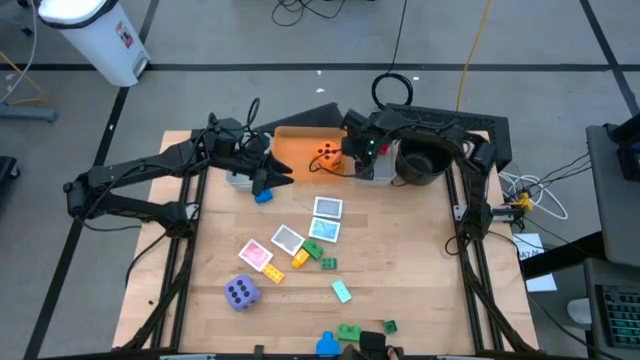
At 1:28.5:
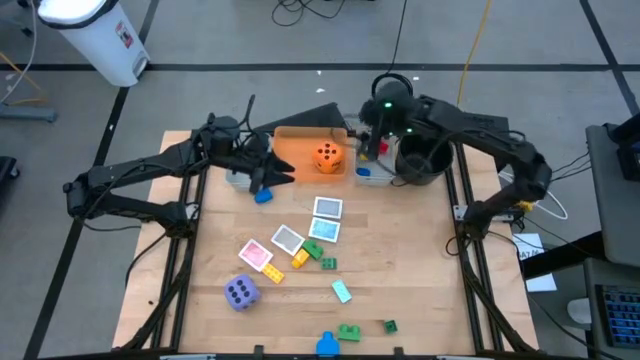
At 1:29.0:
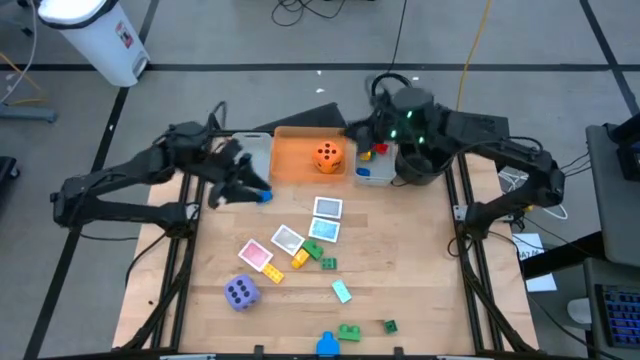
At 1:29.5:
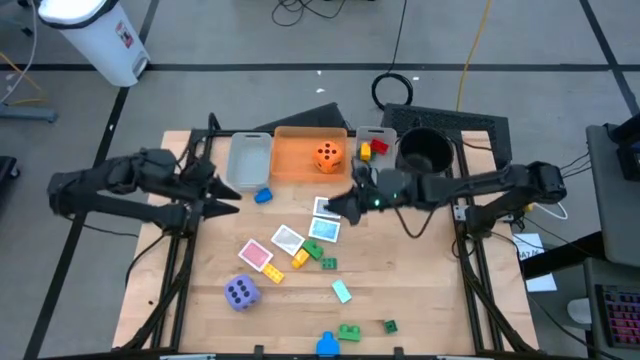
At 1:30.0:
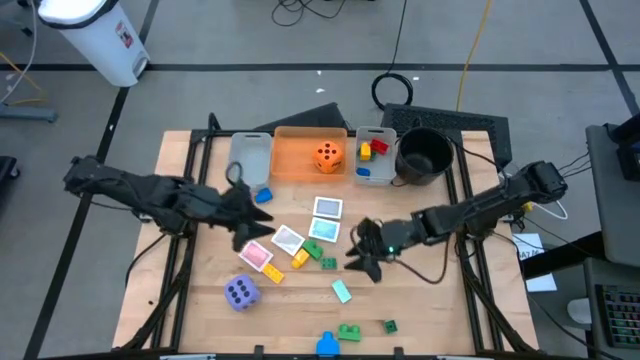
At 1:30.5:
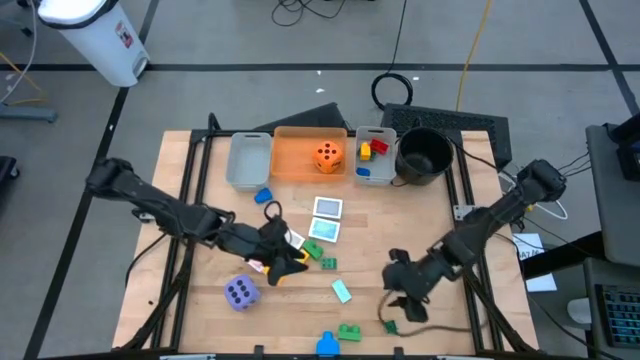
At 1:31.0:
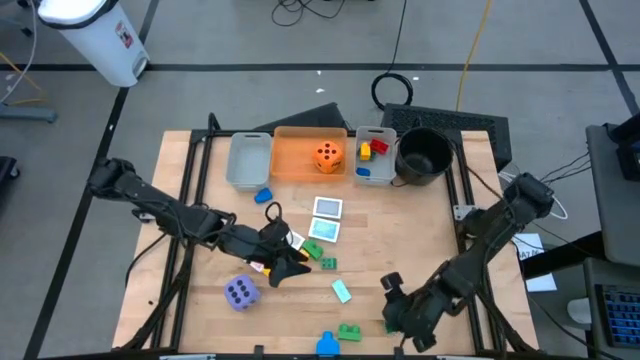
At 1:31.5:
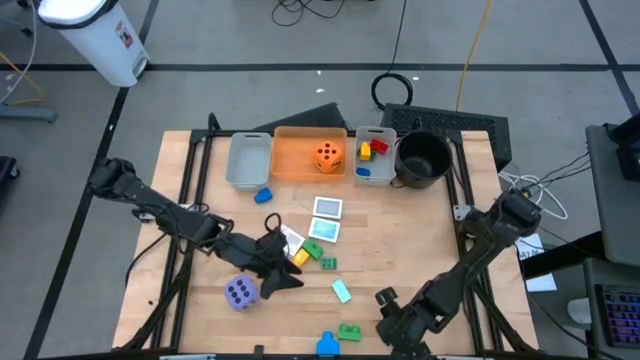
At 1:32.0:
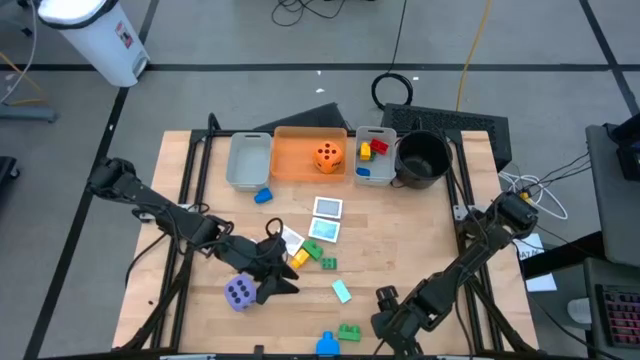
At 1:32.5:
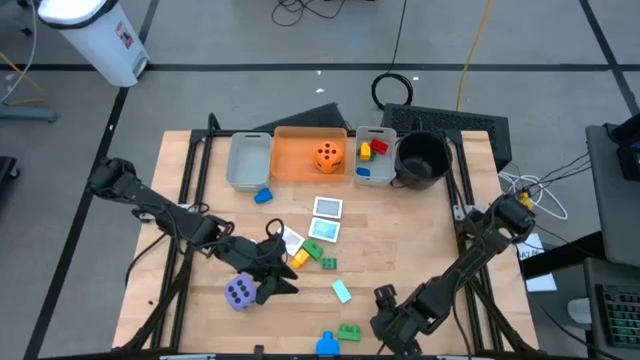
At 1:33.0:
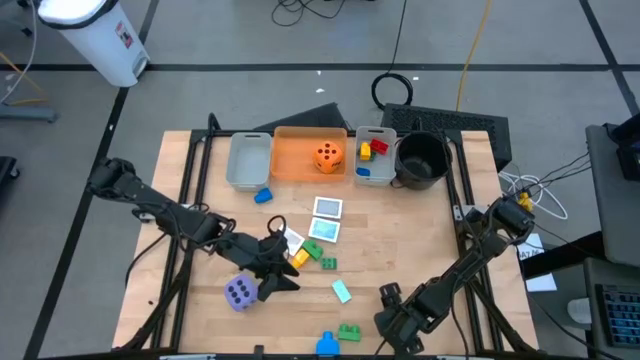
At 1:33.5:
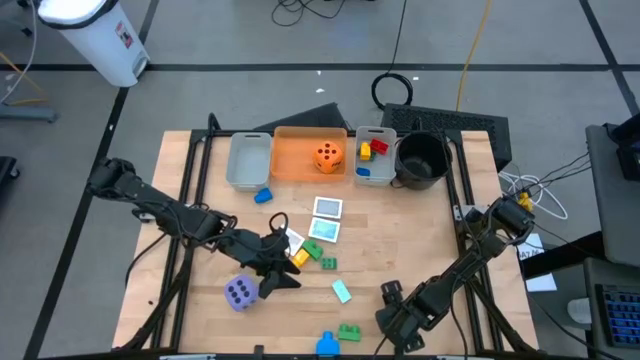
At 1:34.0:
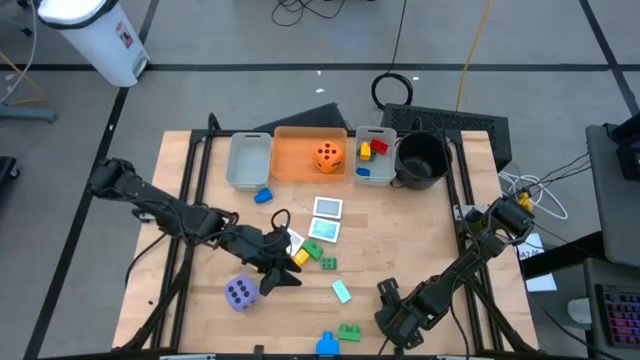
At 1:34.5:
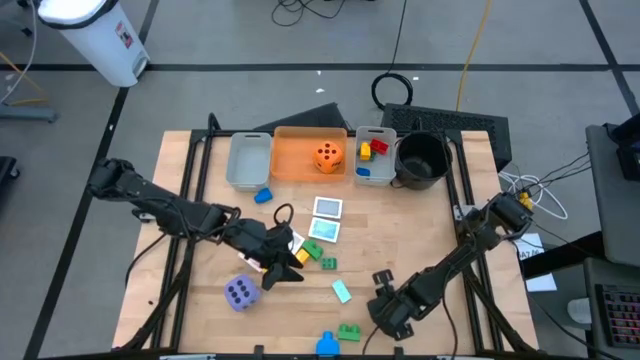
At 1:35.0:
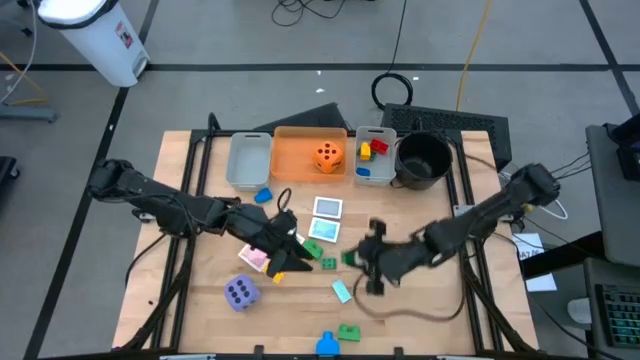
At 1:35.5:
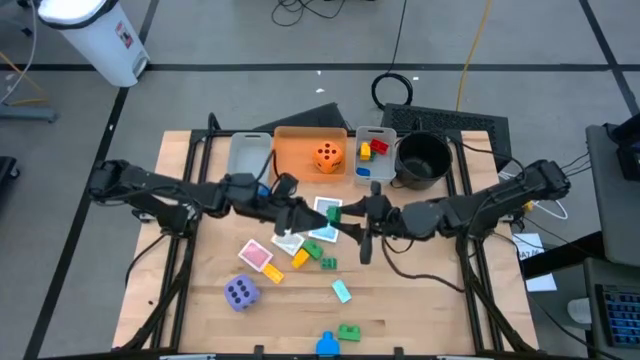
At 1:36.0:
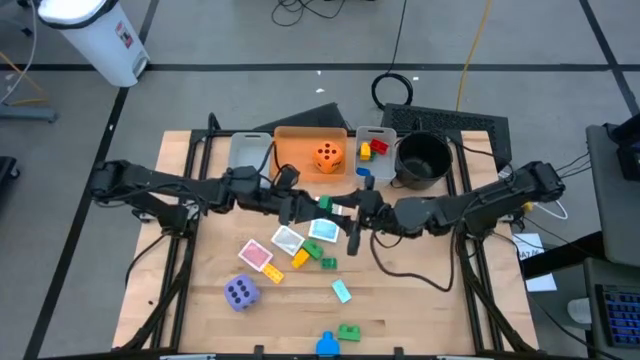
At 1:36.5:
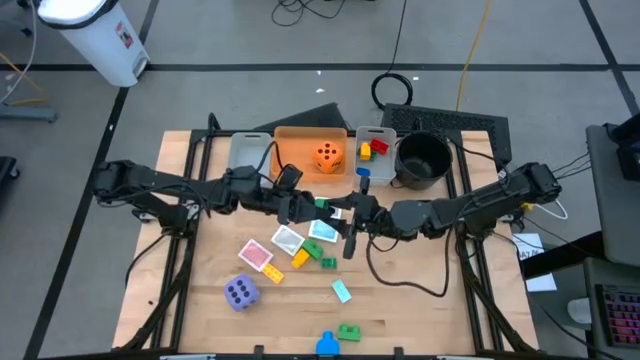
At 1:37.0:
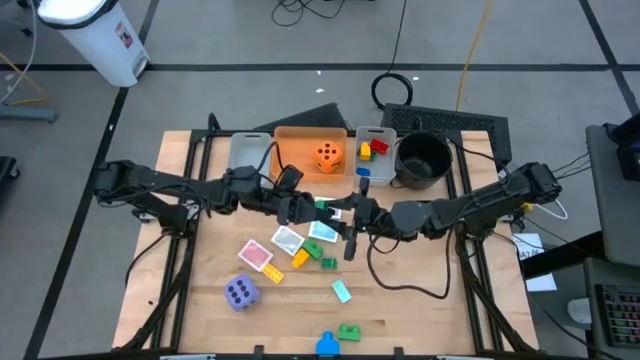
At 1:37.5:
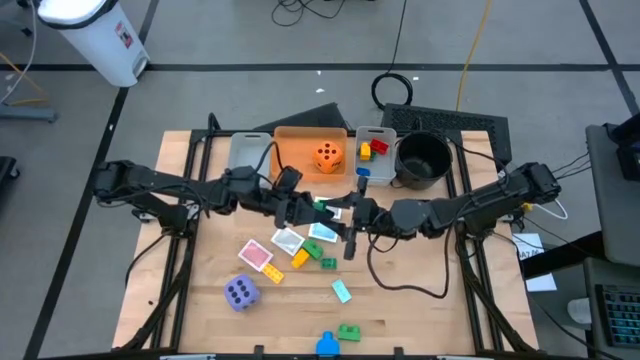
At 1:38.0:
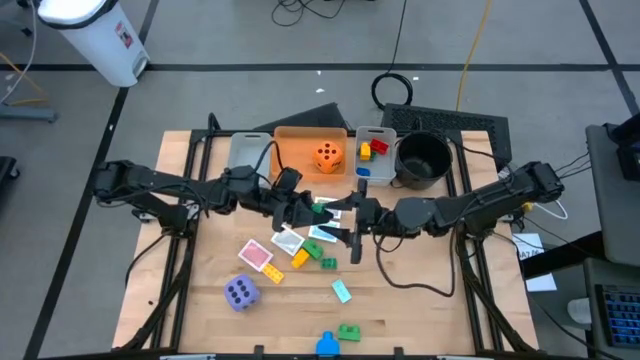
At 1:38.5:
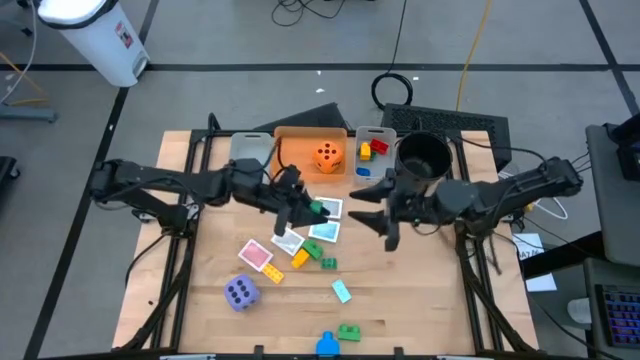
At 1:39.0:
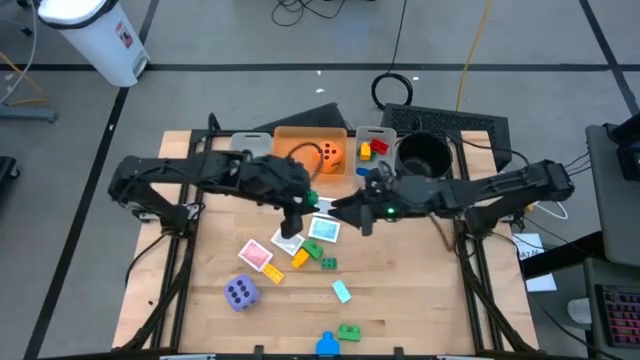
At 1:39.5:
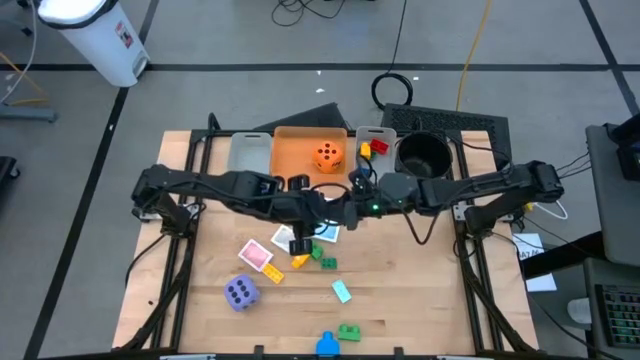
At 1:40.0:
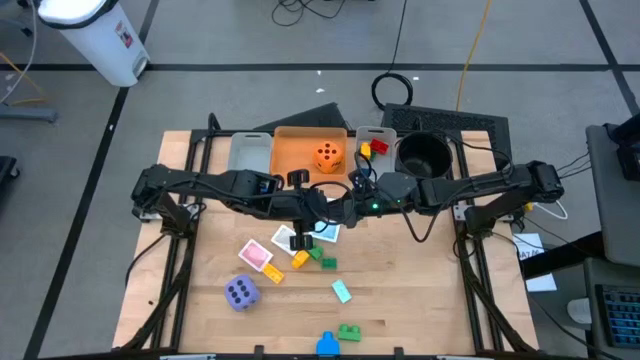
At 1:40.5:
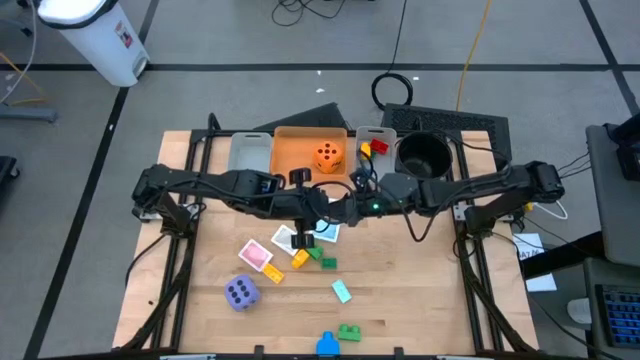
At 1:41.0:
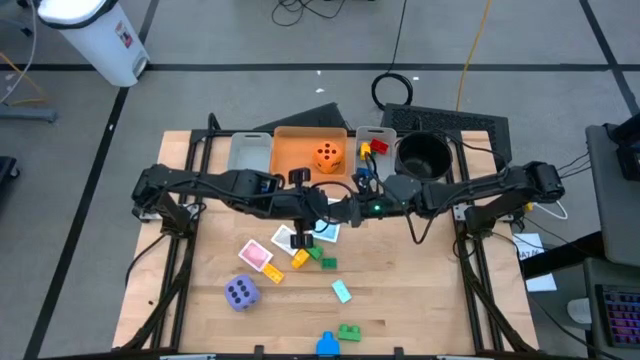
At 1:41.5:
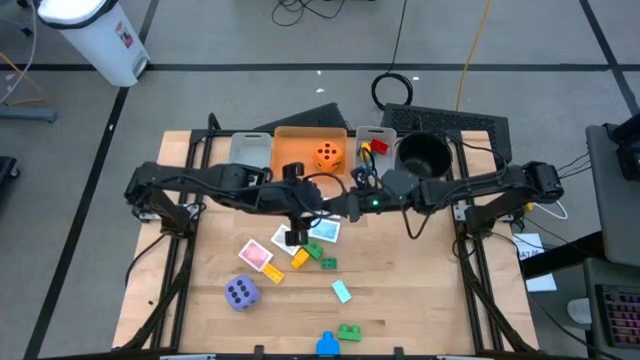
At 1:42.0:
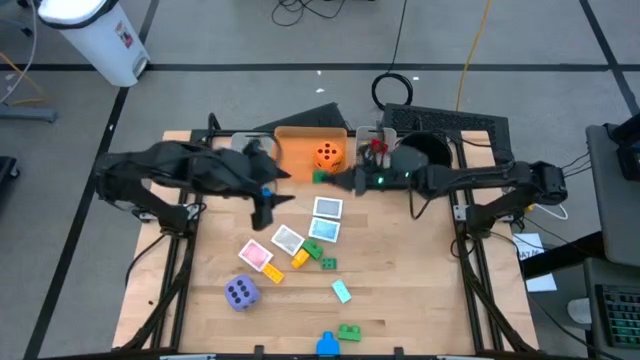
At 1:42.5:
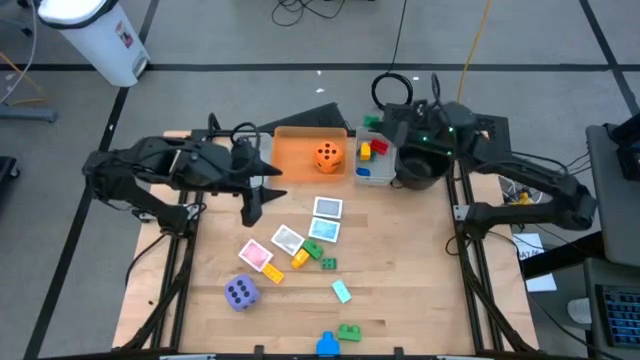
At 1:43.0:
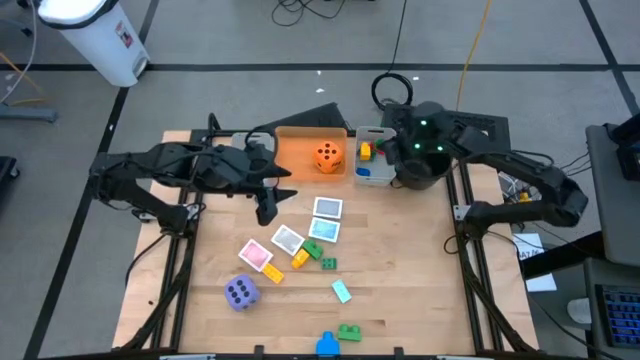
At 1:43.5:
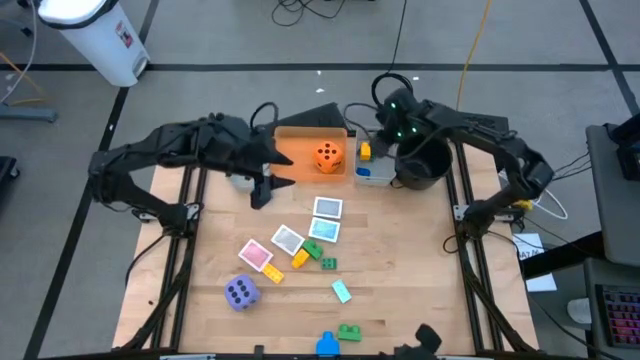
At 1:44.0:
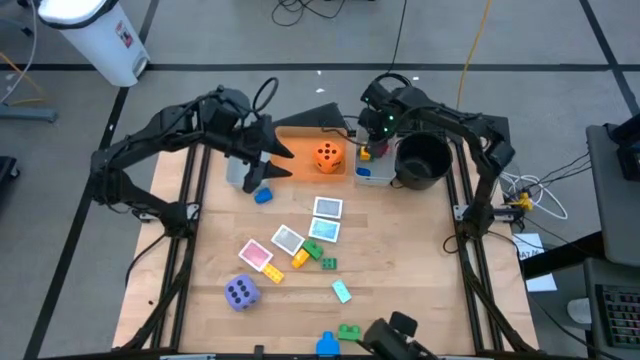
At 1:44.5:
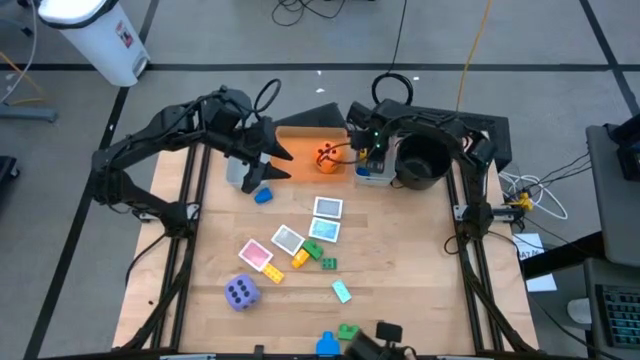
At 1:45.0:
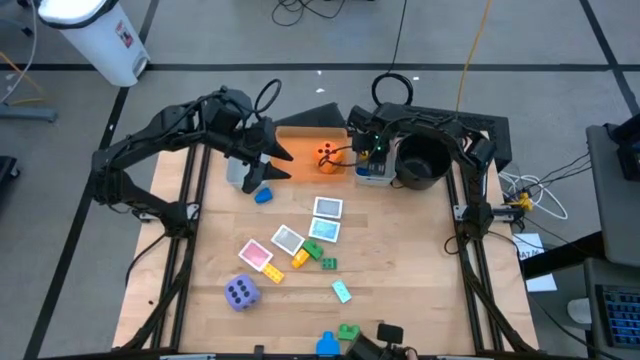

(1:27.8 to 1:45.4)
Task: Pick & Place Toys
Put the green game piece into the right gray bin

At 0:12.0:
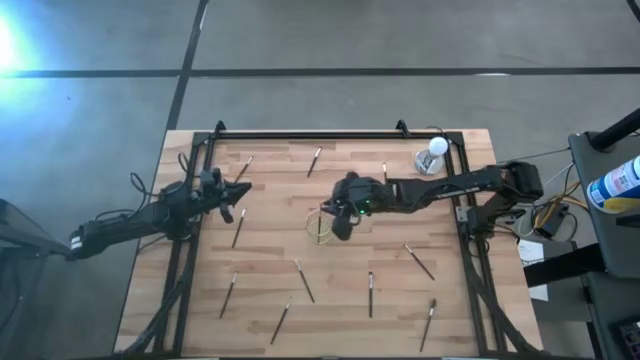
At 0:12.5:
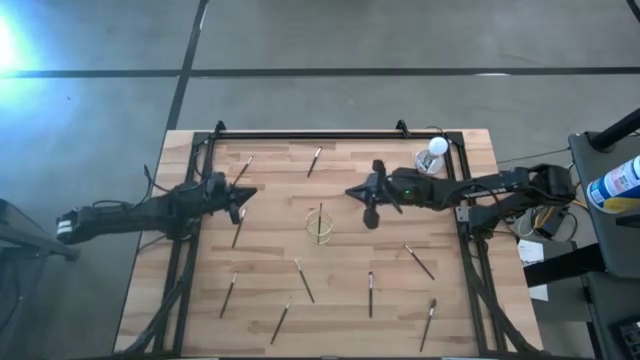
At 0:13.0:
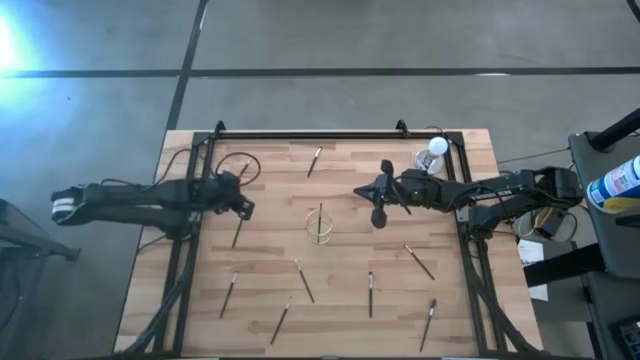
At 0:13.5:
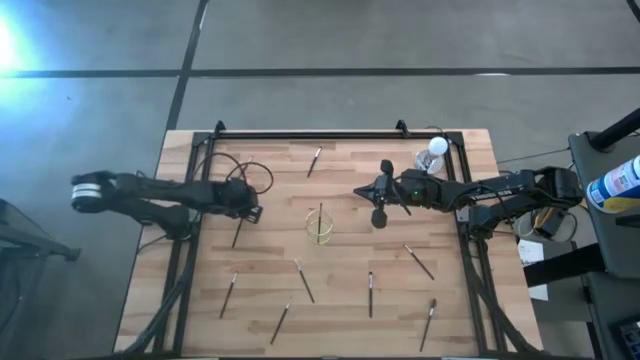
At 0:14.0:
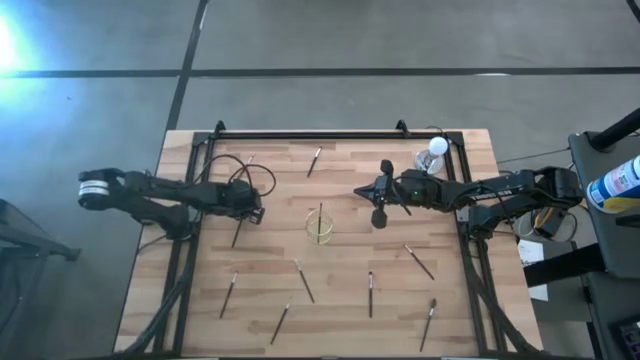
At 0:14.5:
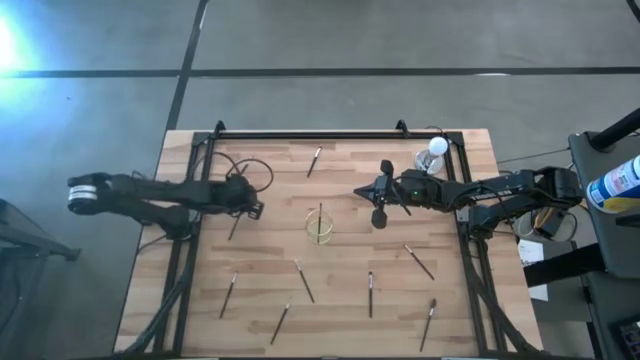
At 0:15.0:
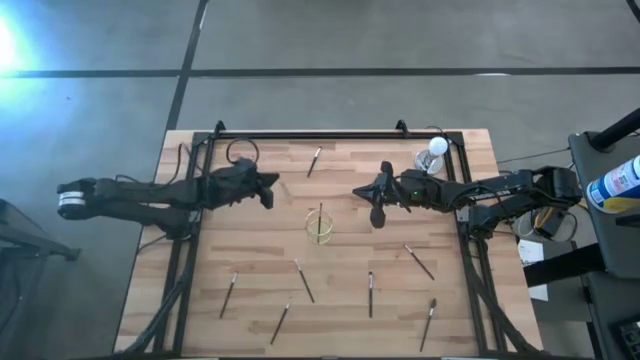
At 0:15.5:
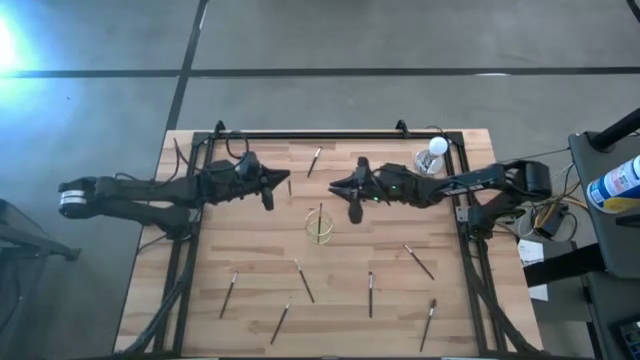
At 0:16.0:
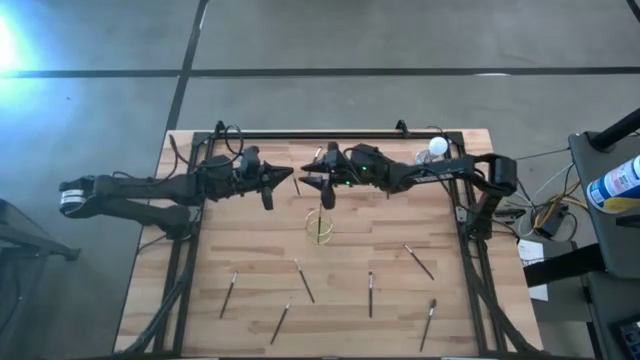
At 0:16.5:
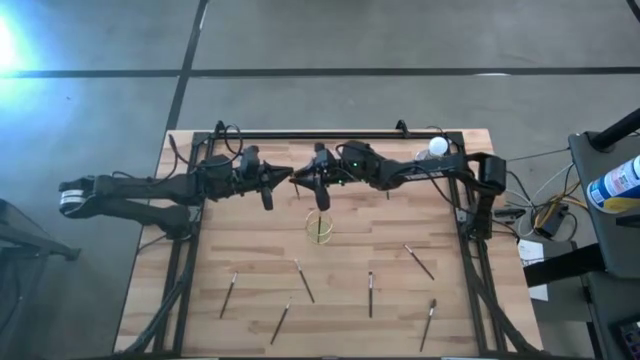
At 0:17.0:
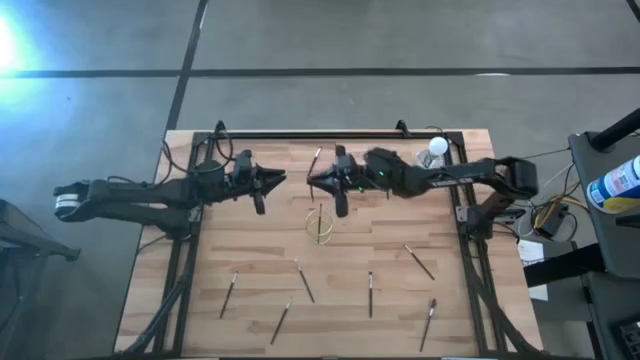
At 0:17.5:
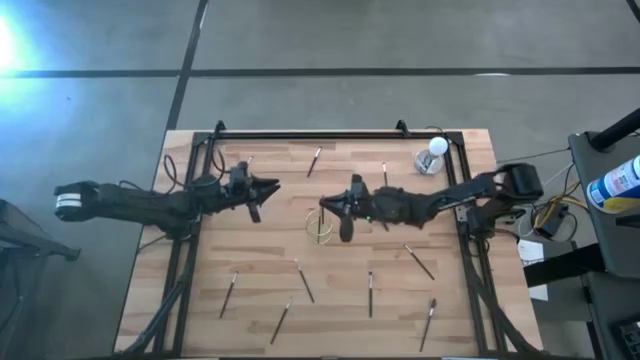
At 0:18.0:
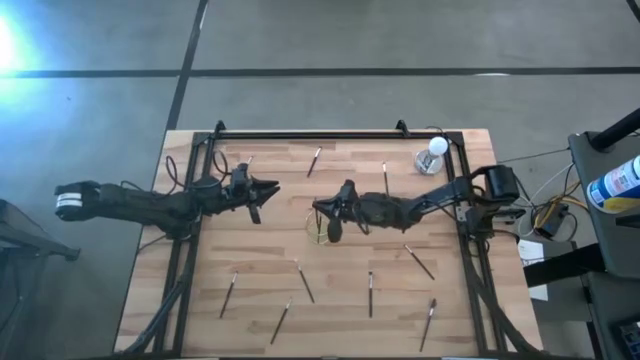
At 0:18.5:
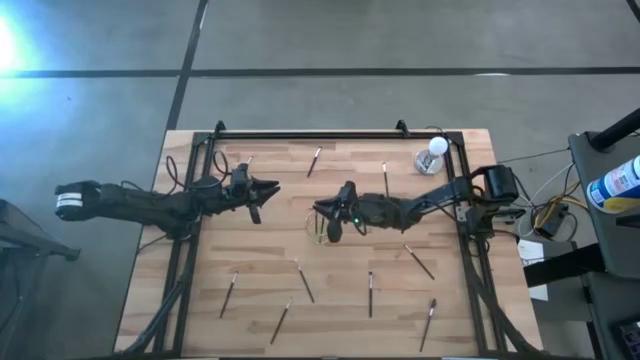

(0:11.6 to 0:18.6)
Task: Pick & Place Makeup Brushes
Put the eyeshadow brush into the gold makeup brush holder
